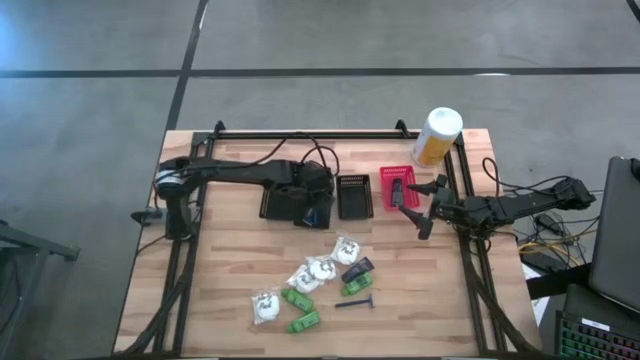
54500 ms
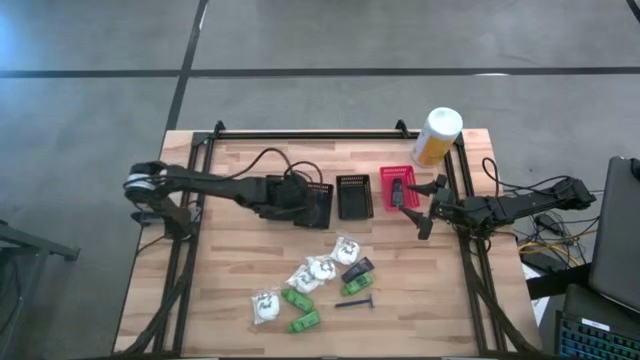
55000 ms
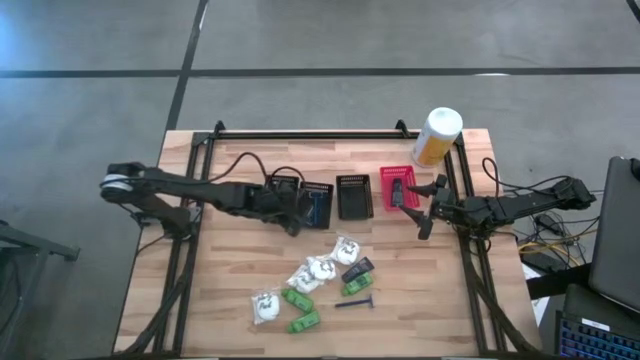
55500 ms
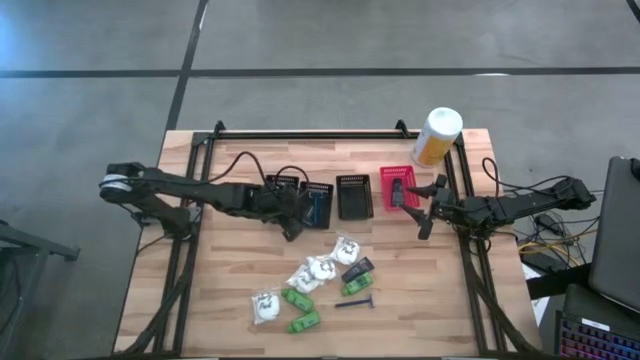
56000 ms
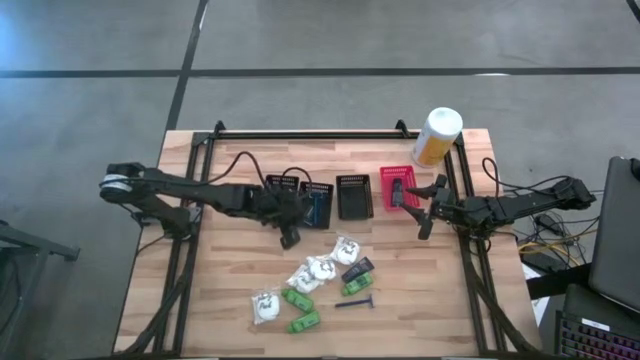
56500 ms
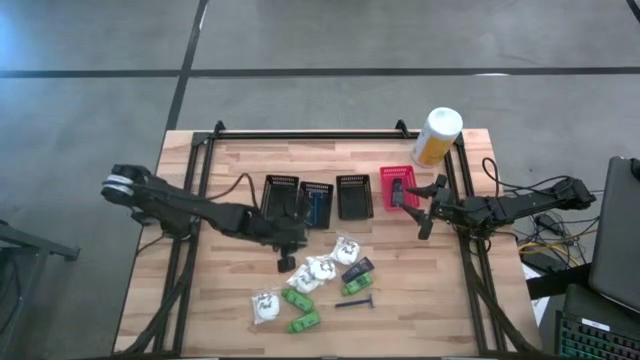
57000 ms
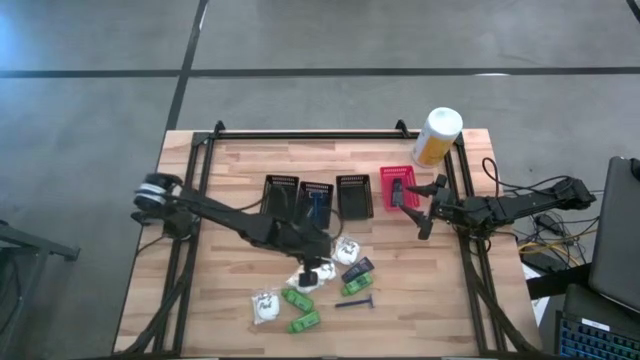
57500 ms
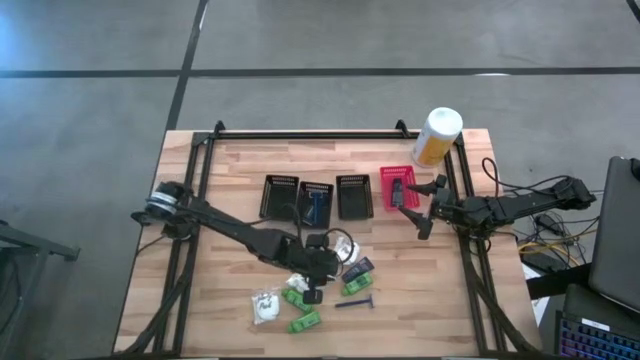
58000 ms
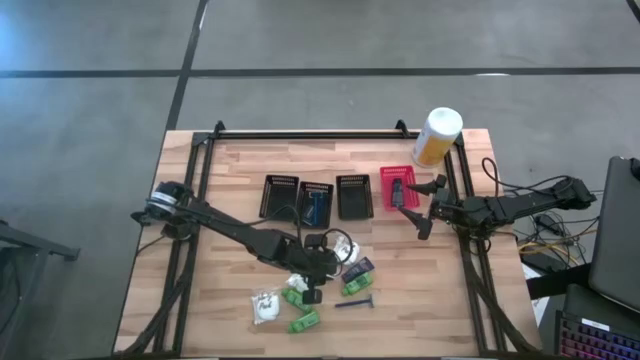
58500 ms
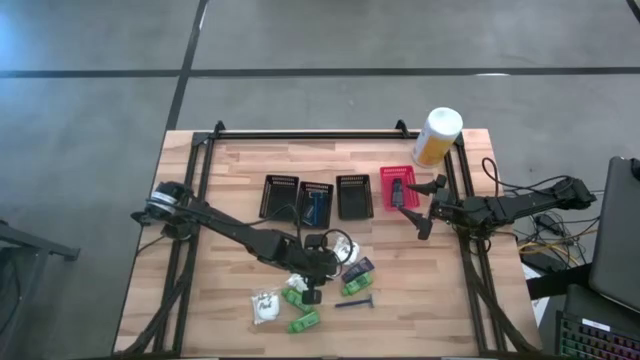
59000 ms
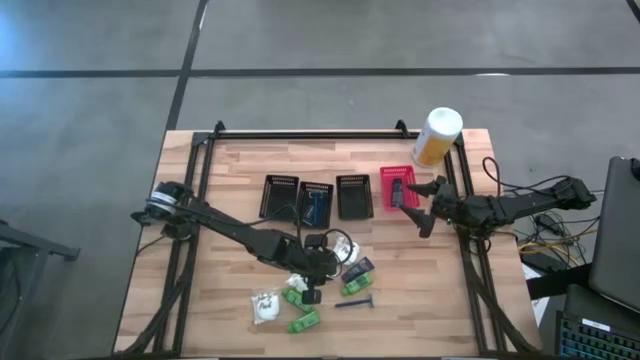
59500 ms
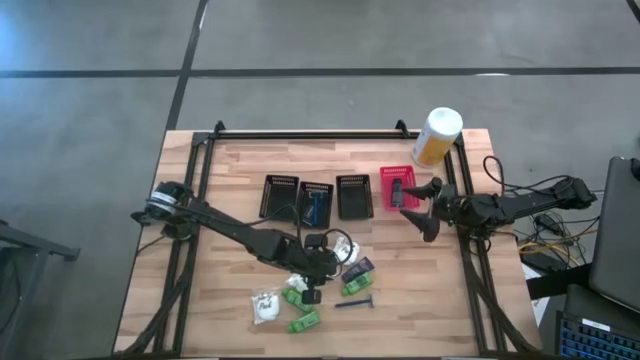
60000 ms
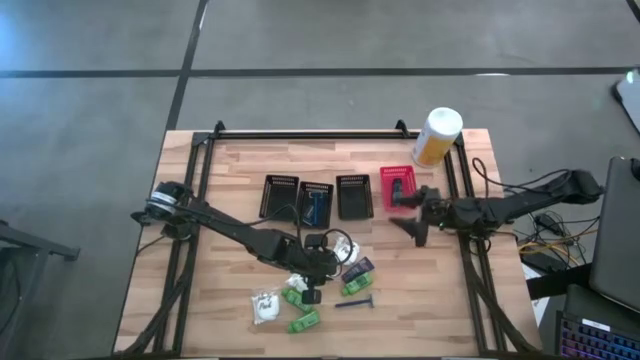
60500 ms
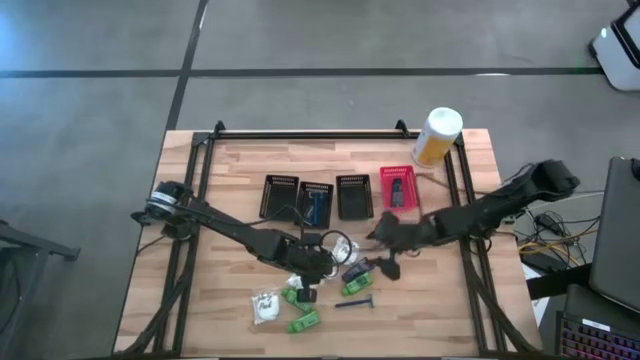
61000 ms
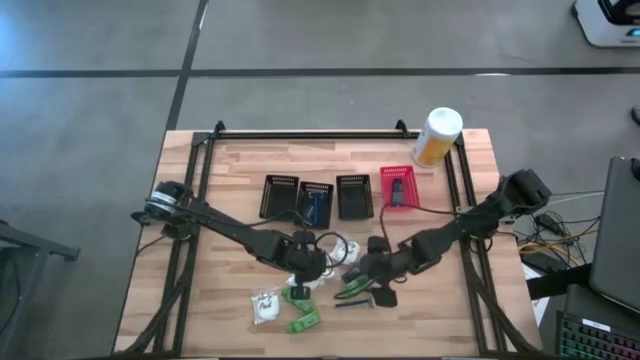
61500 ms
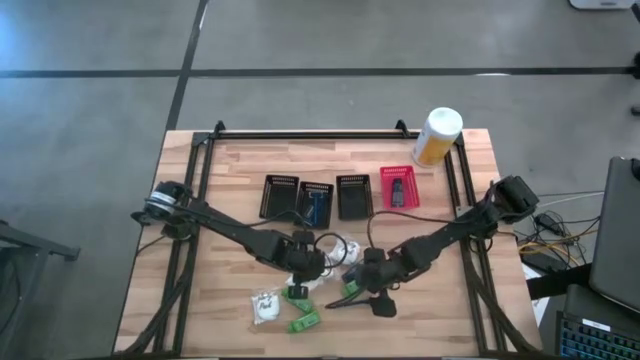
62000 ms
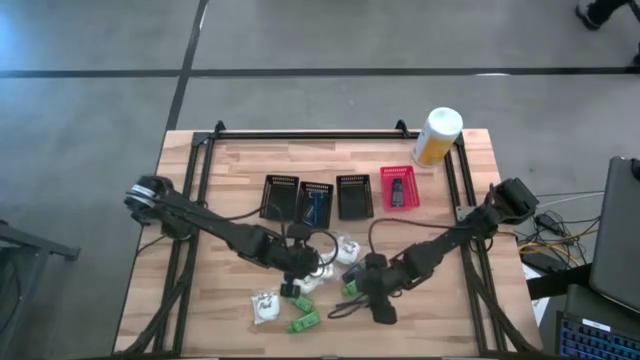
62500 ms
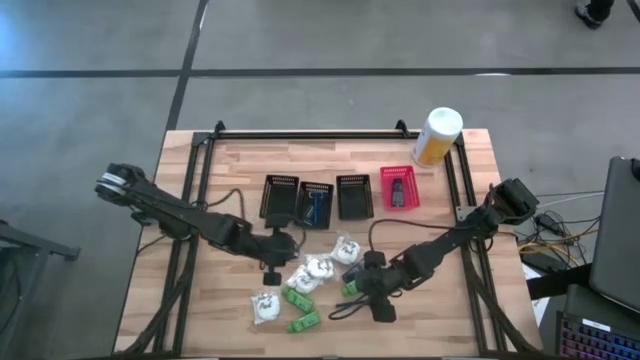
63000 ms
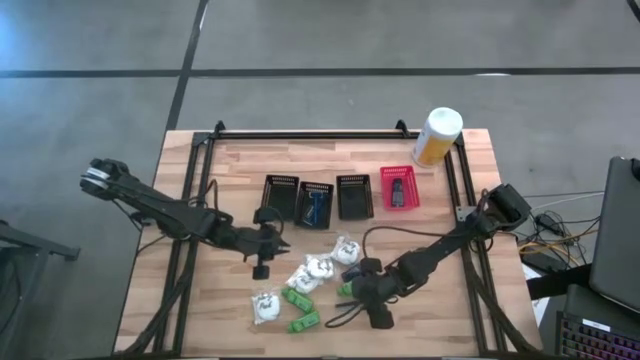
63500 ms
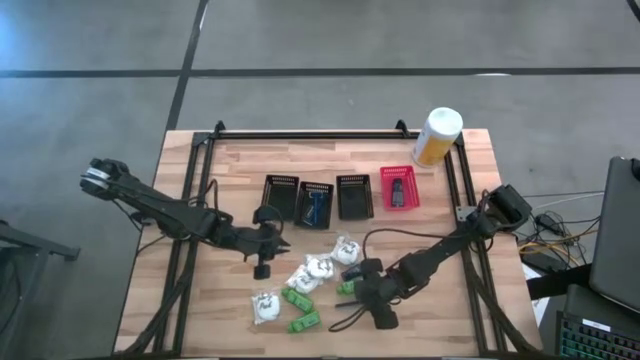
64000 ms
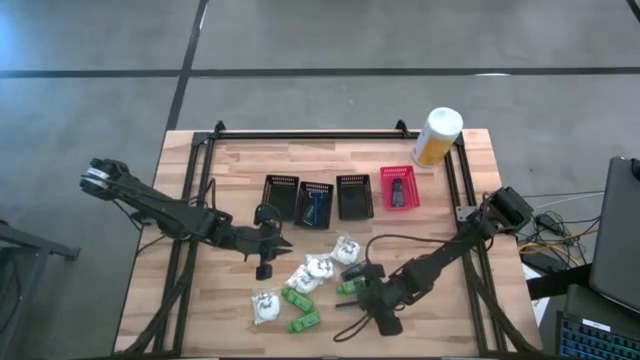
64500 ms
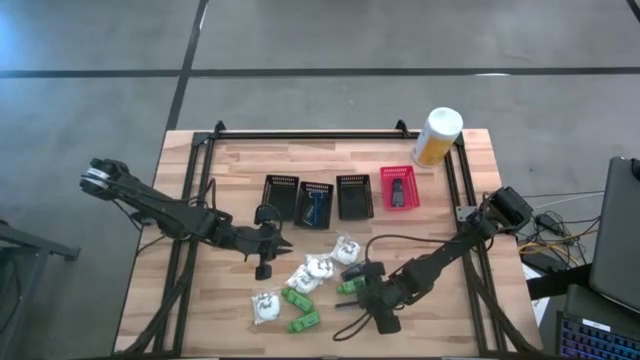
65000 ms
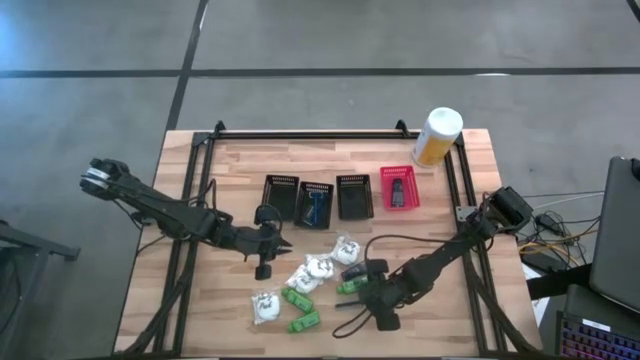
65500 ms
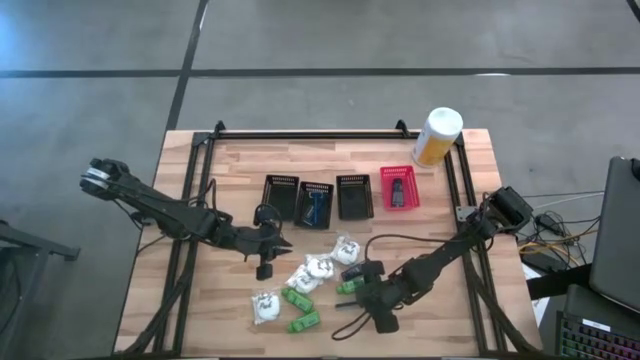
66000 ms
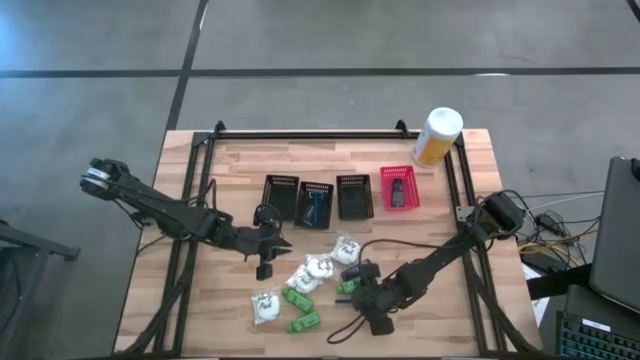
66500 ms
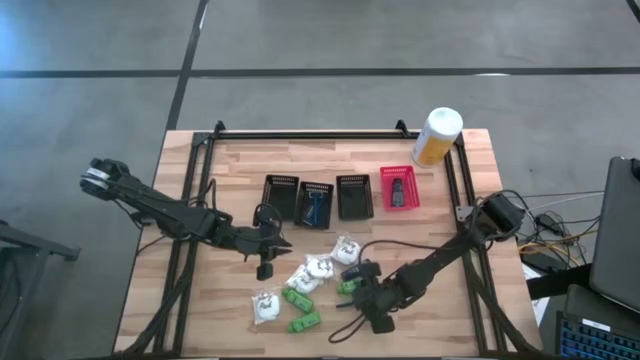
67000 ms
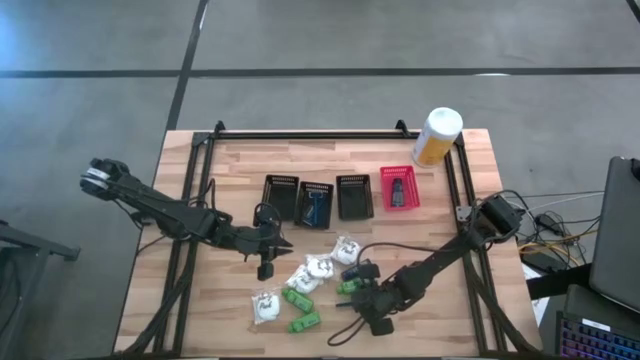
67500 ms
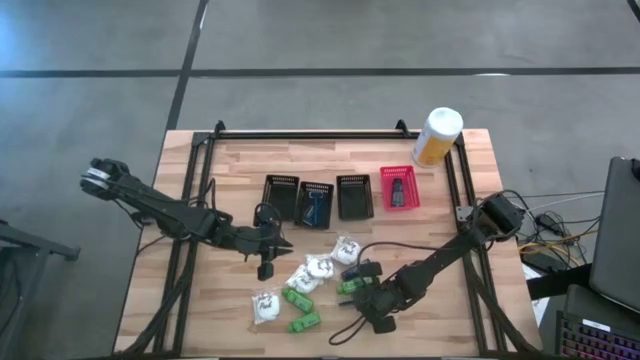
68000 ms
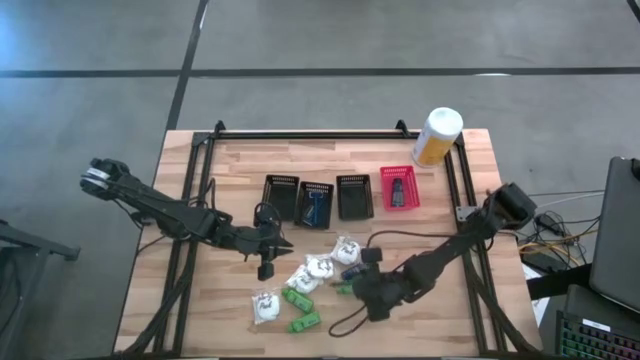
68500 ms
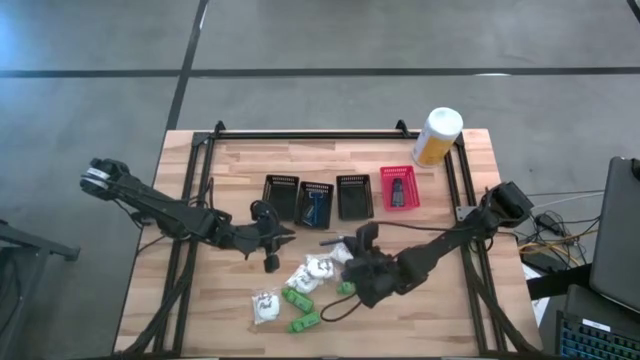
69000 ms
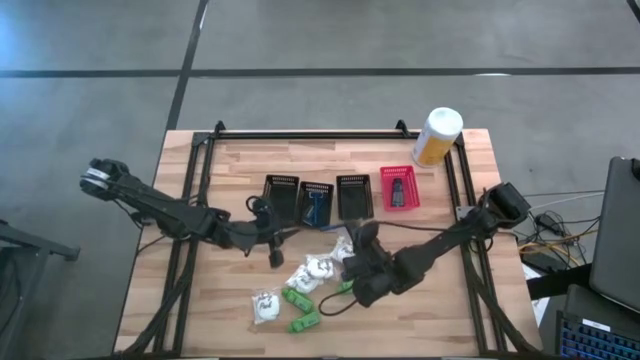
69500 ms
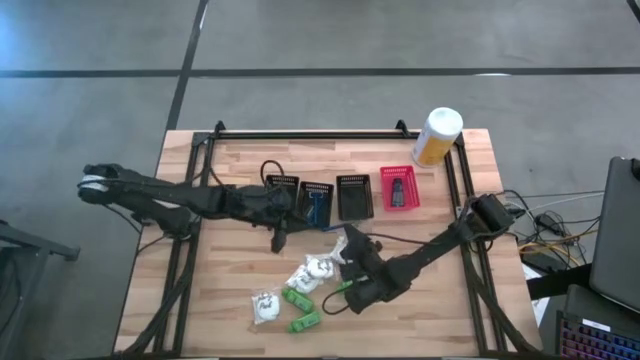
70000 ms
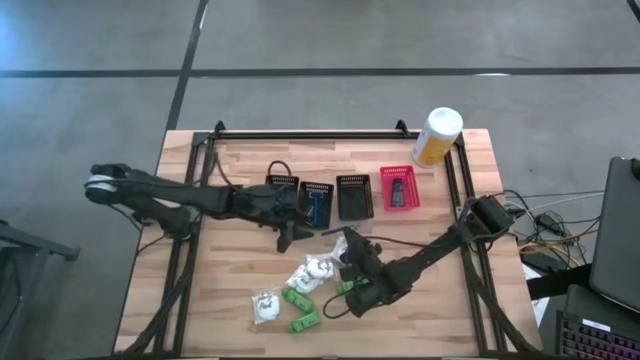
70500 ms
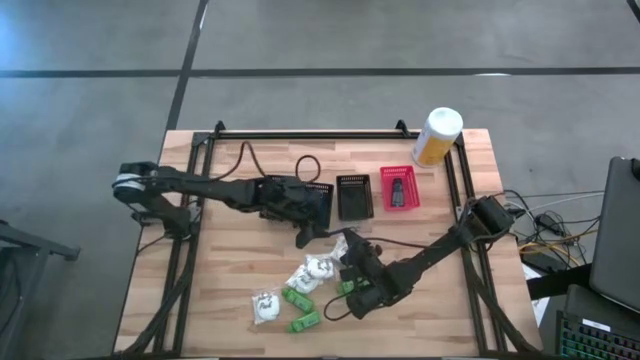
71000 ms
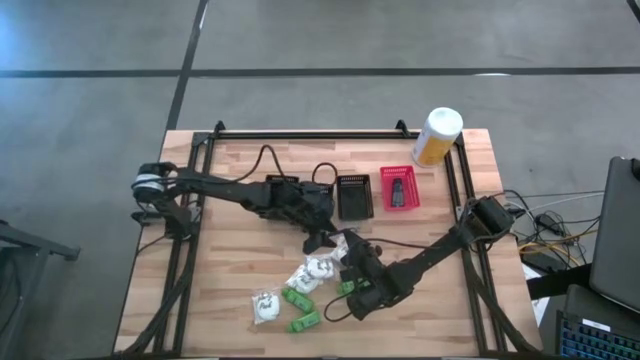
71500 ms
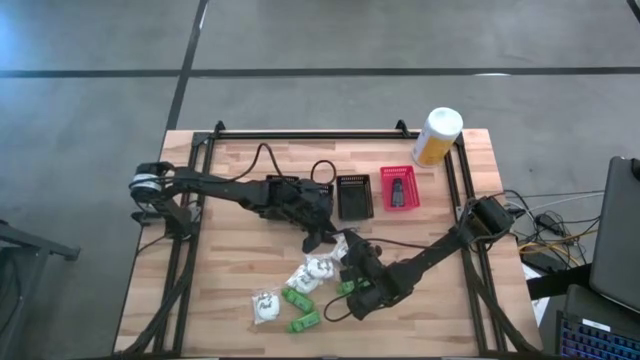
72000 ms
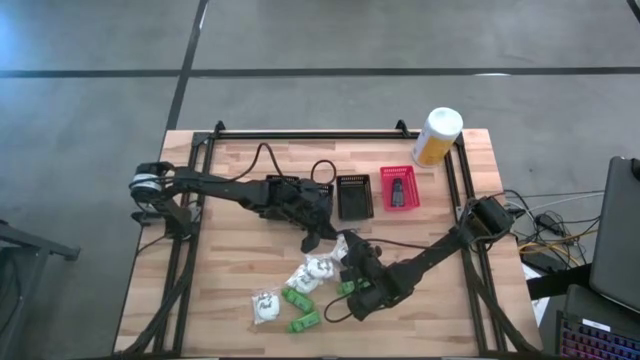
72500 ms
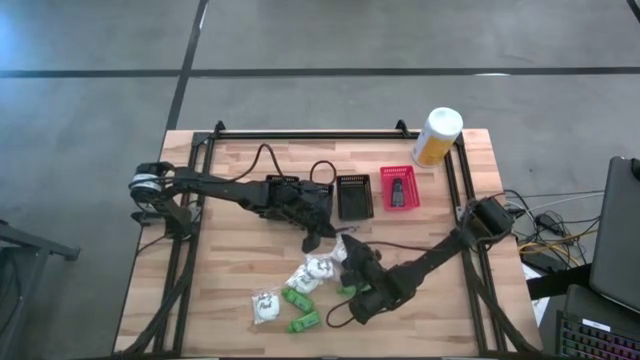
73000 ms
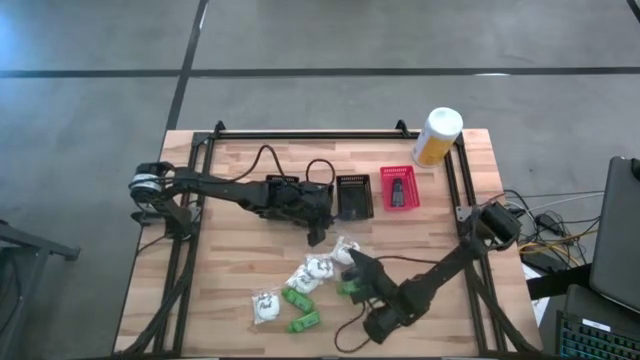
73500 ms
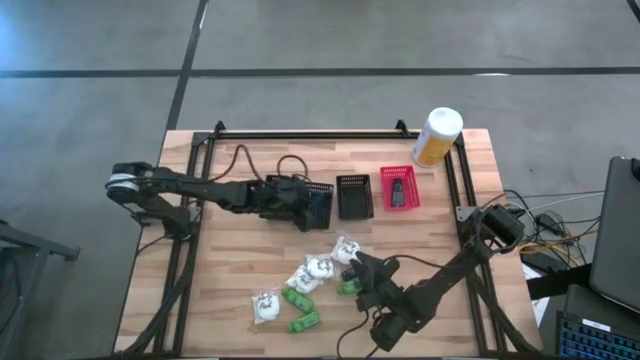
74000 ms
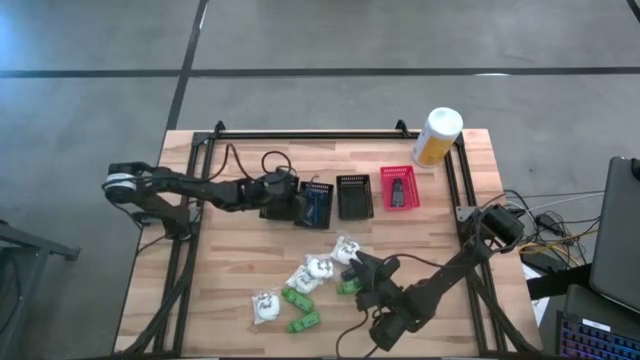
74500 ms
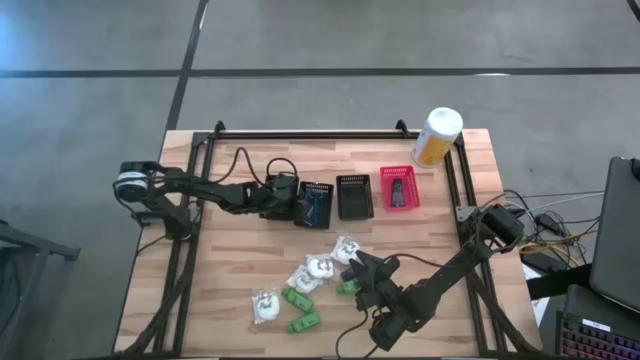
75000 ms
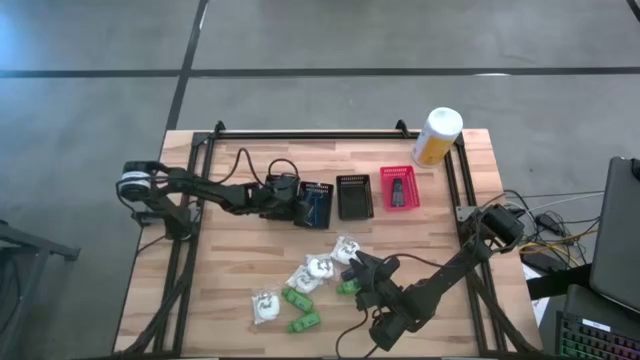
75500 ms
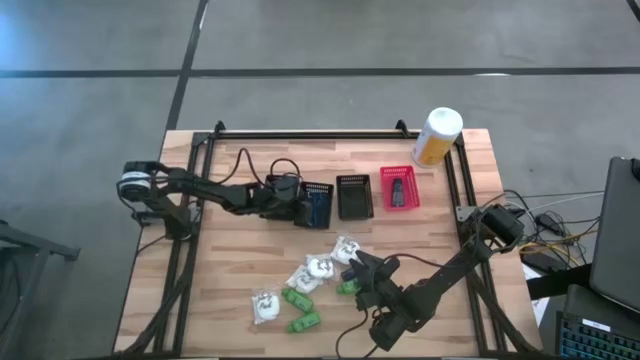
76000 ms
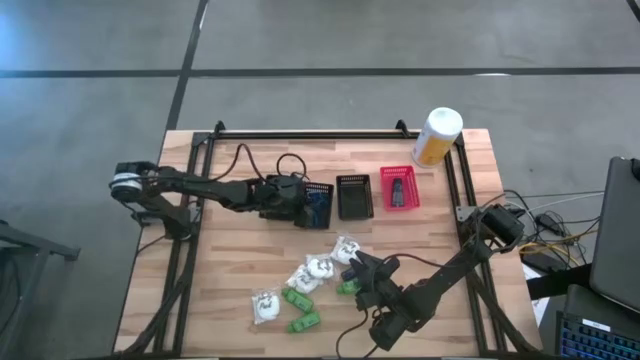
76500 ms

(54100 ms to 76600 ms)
Task: Pick & Place Travel size toiletries
Put the blue razor into the middle black bin
